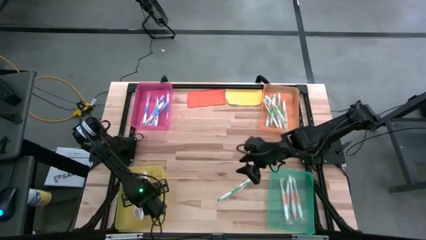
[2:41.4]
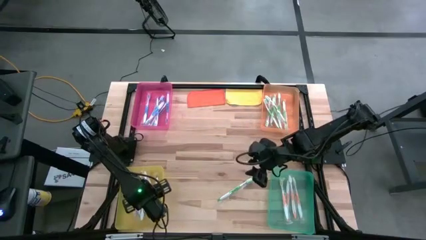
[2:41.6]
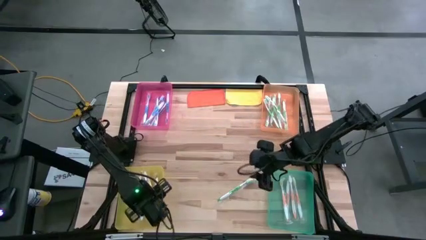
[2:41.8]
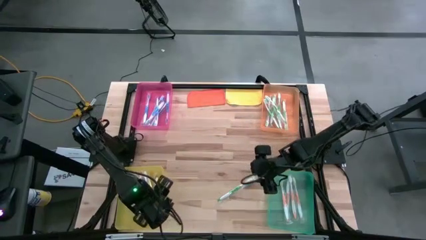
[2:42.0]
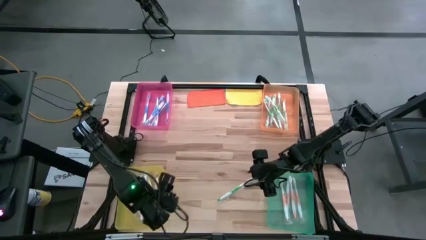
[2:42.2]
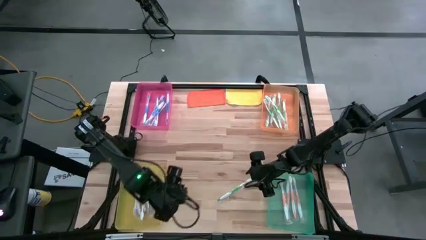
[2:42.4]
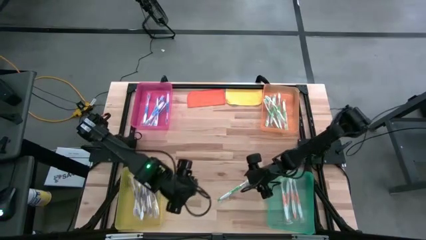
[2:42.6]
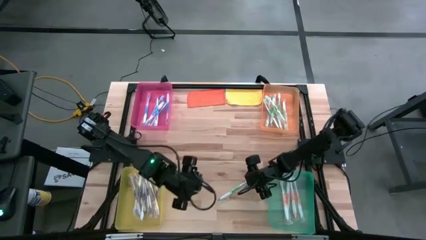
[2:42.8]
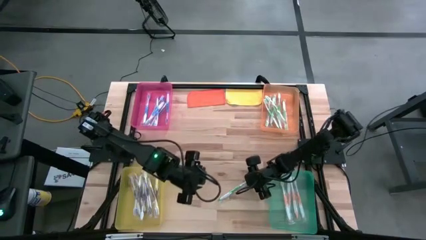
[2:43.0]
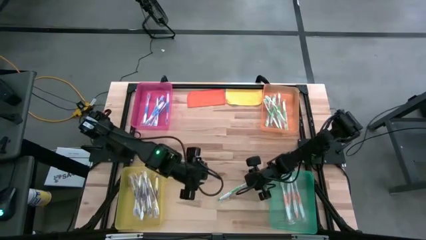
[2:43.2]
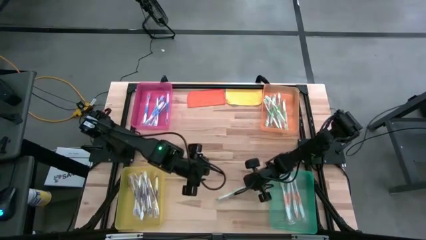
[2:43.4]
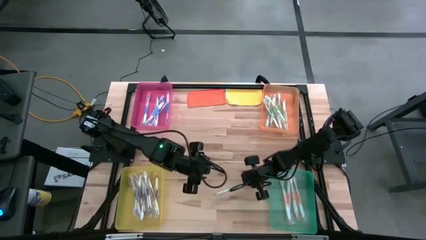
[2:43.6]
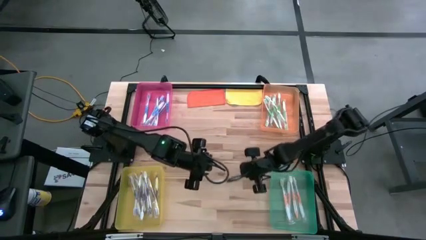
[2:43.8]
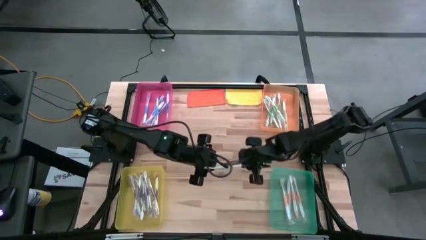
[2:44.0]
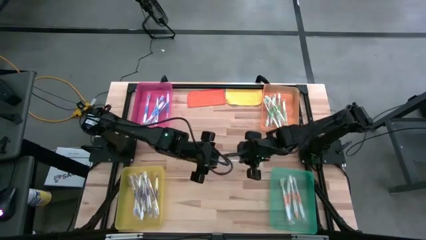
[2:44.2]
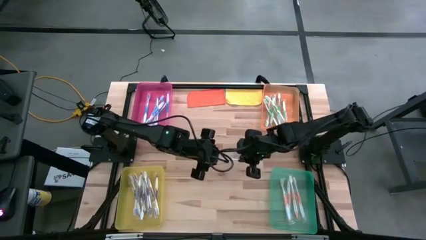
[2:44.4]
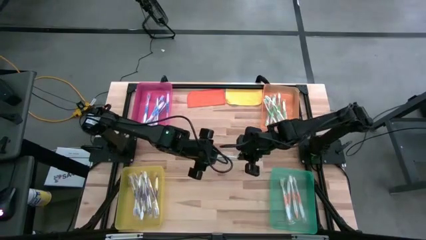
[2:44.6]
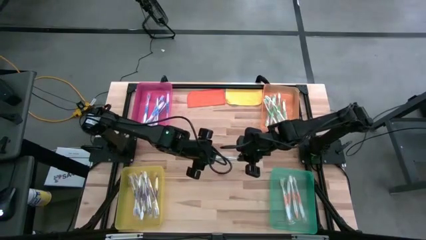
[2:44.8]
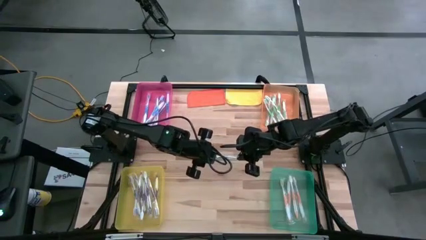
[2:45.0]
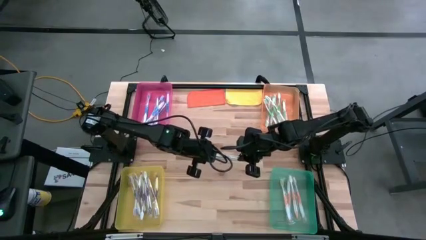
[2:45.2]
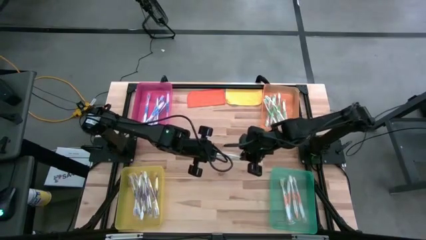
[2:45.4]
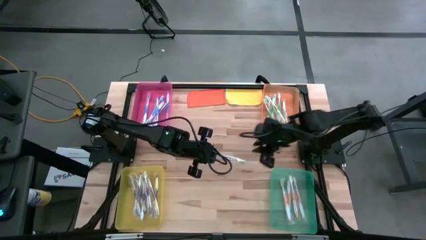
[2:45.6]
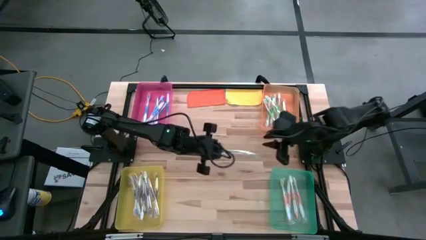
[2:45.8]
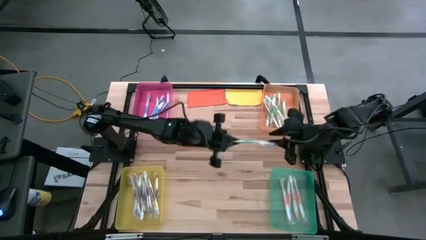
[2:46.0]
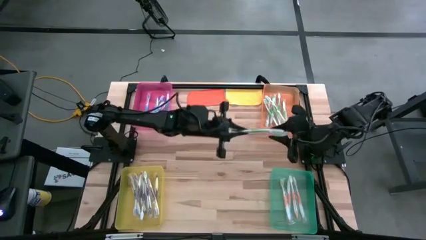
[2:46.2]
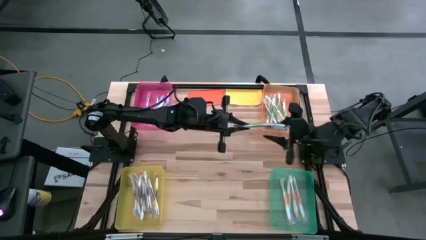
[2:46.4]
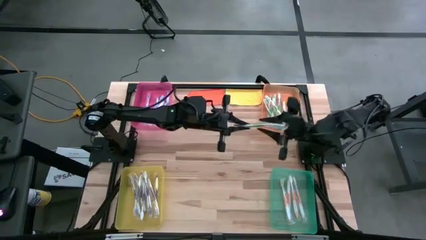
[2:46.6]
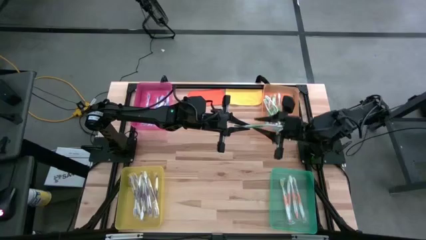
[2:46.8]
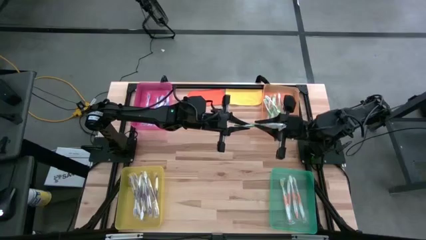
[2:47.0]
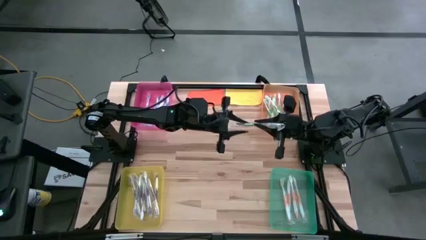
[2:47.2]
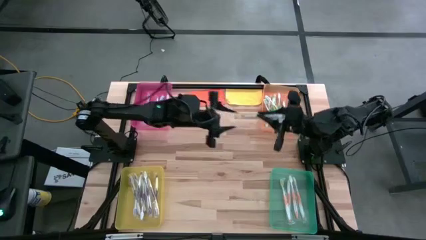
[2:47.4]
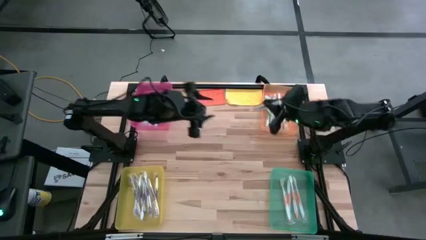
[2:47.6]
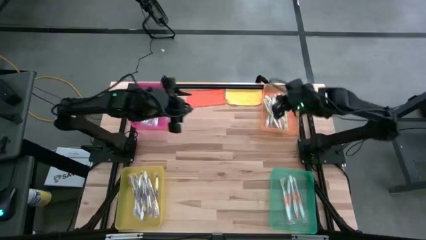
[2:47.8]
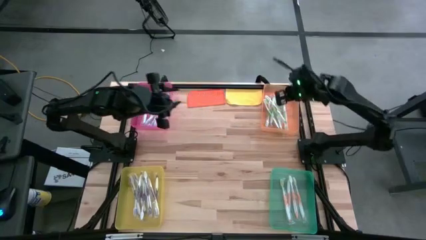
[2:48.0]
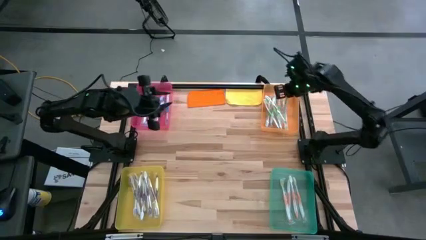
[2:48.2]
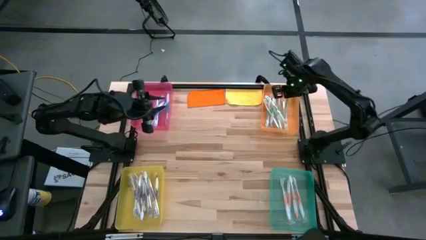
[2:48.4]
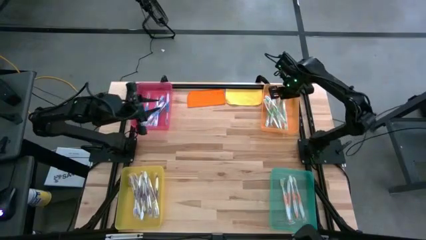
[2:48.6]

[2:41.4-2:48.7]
Task: Pick & Place Toothbrushes
Put the green toothbrush into the orange bin

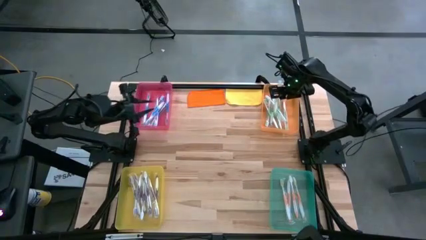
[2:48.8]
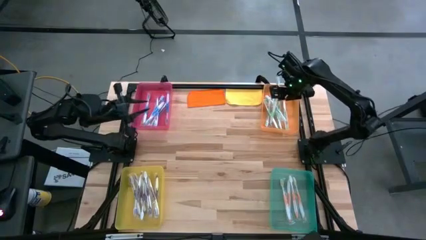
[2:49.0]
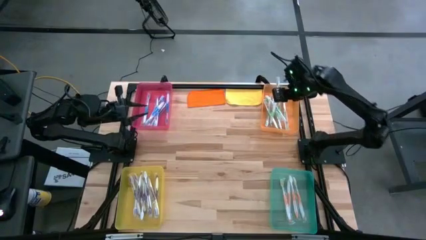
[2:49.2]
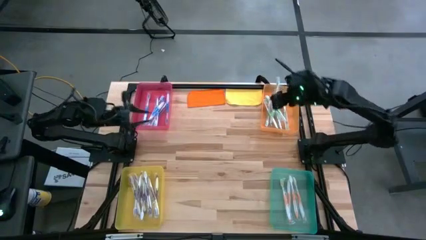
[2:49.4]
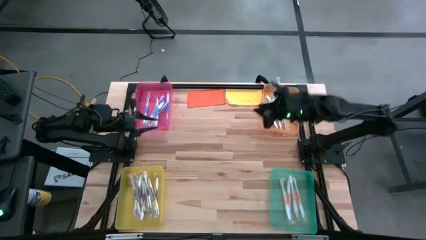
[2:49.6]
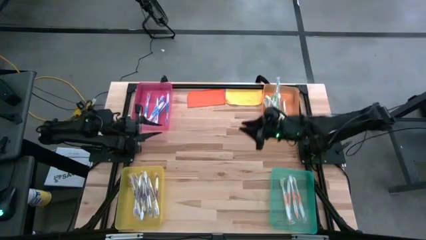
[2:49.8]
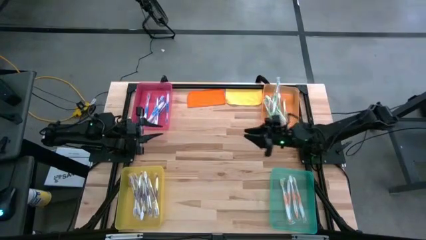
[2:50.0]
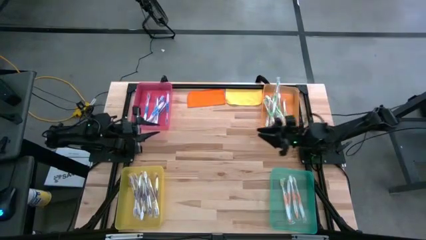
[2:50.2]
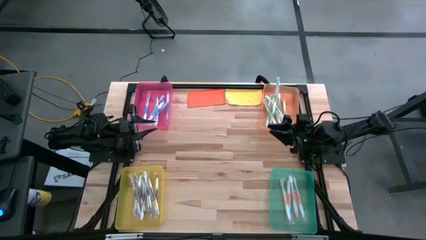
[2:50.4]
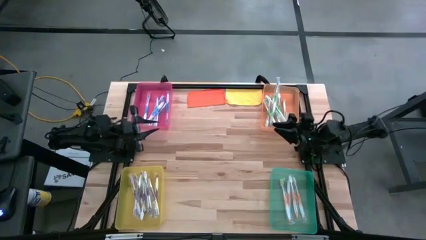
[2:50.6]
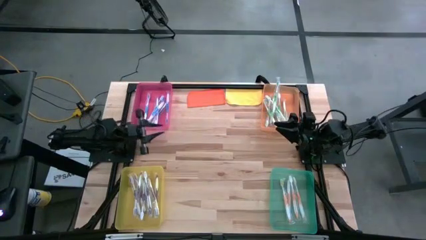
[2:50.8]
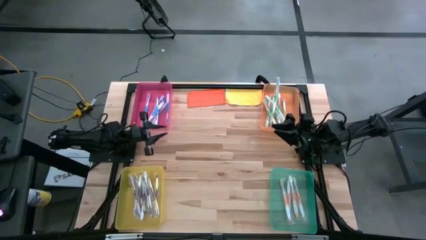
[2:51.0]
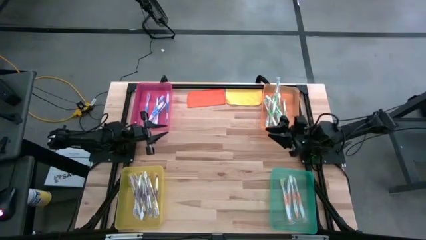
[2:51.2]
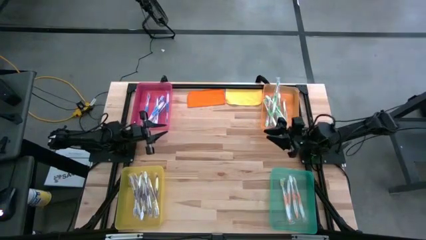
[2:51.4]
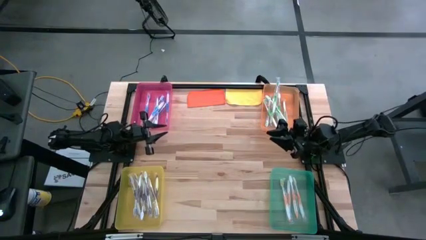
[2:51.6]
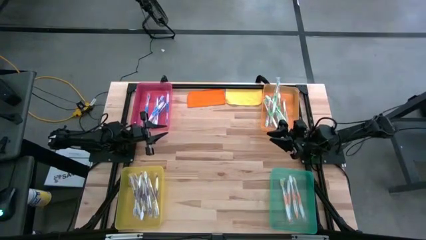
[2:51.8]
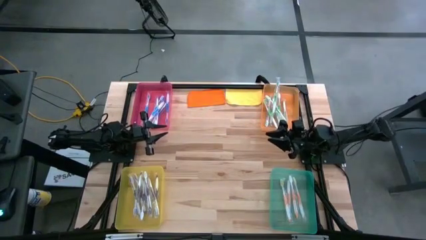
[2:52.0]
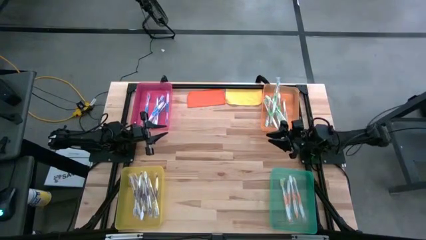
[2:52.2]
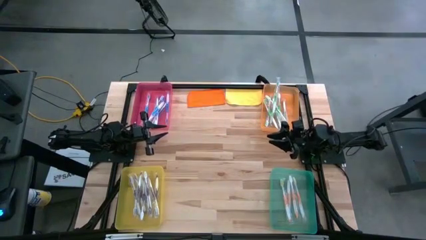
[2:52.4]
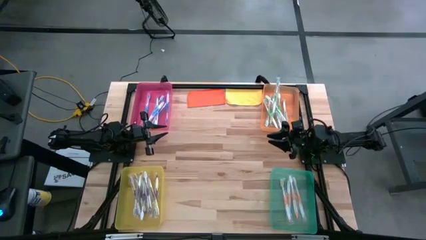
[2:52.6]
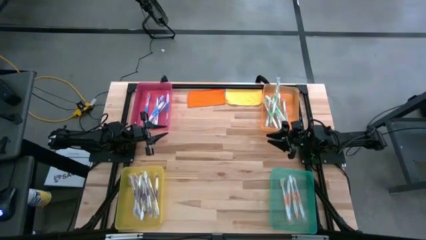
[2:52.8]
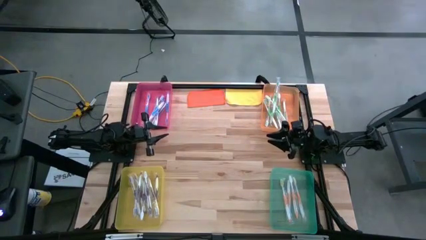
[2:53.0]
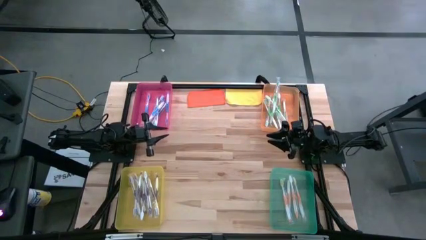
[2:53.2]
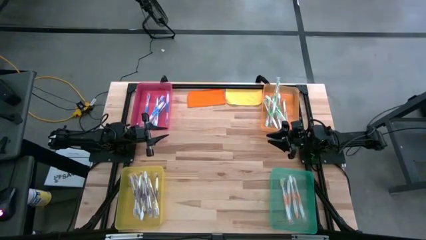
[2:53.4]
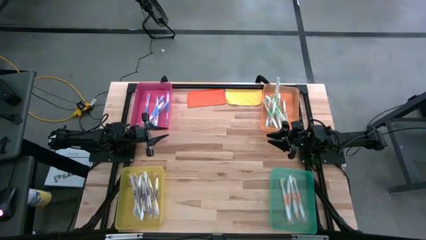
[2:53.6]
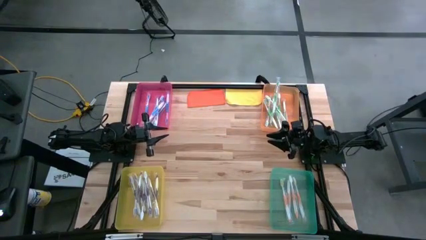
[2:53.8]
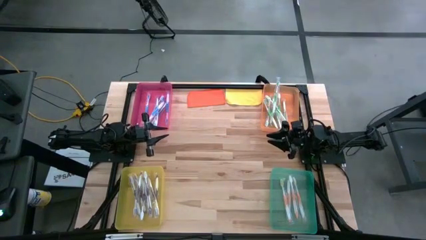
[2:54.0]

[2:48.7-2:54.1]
Return to Home Position

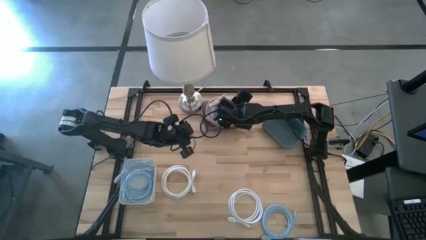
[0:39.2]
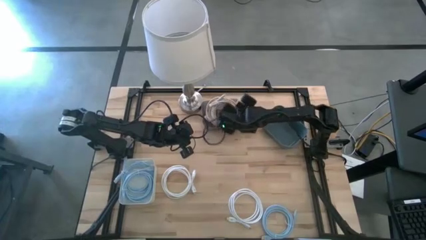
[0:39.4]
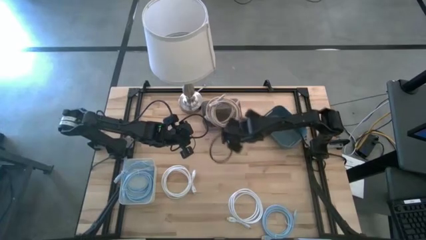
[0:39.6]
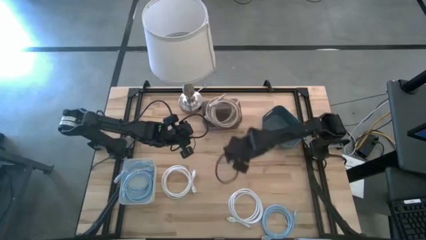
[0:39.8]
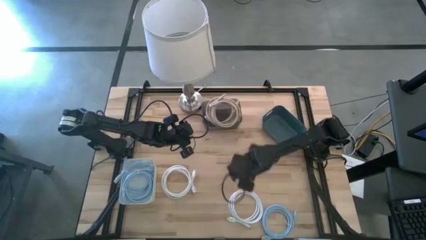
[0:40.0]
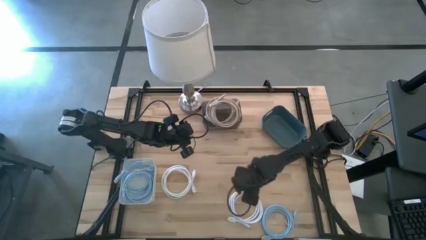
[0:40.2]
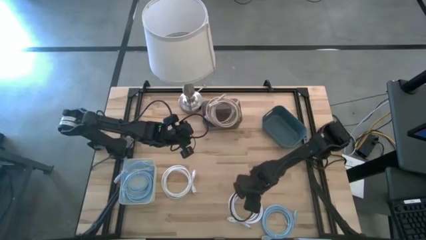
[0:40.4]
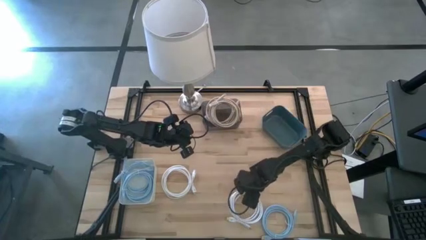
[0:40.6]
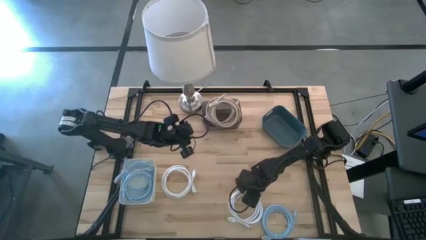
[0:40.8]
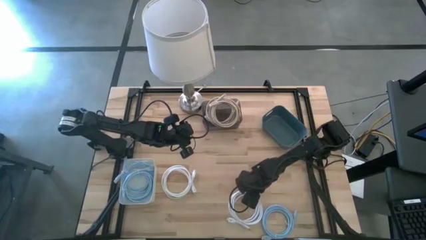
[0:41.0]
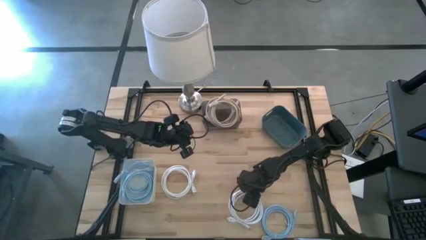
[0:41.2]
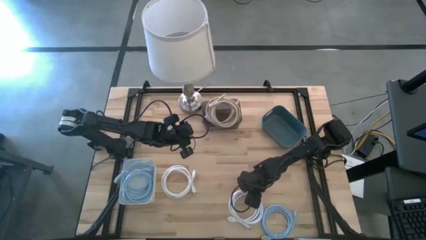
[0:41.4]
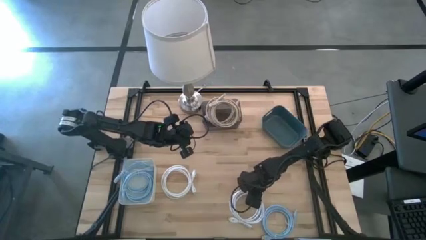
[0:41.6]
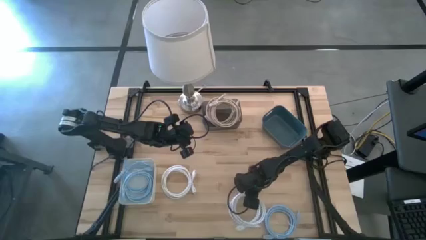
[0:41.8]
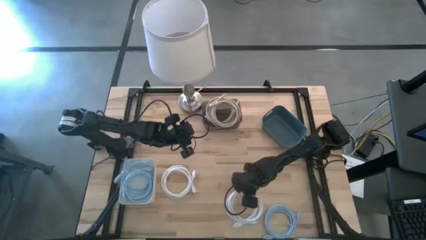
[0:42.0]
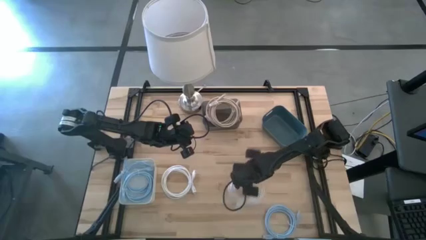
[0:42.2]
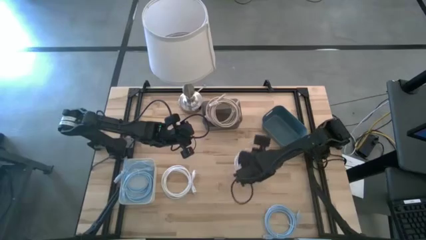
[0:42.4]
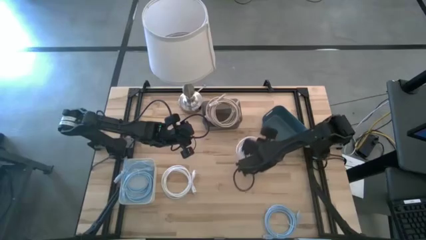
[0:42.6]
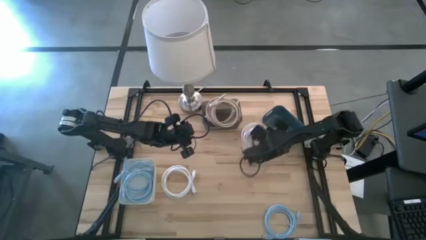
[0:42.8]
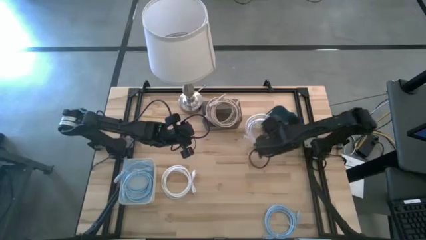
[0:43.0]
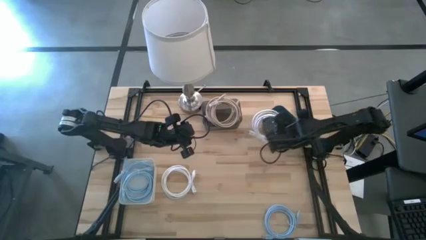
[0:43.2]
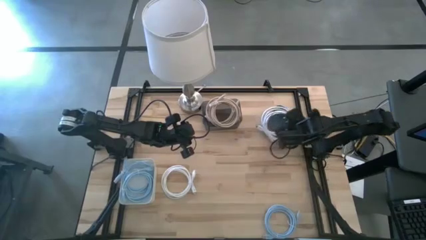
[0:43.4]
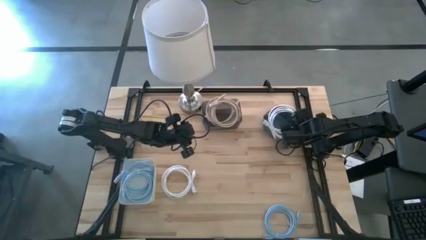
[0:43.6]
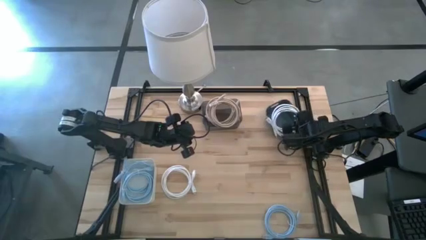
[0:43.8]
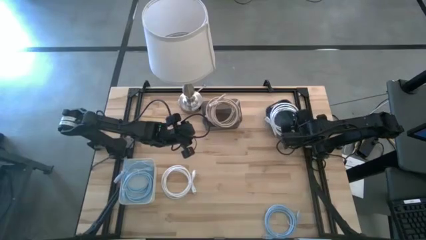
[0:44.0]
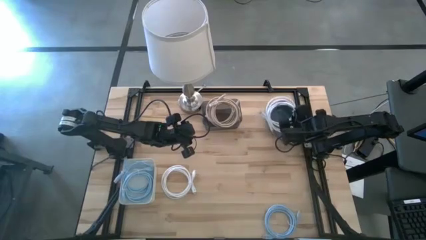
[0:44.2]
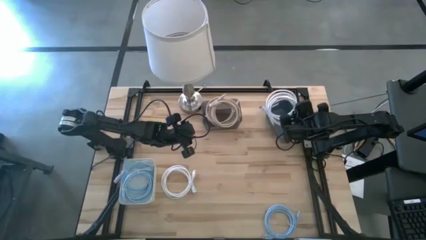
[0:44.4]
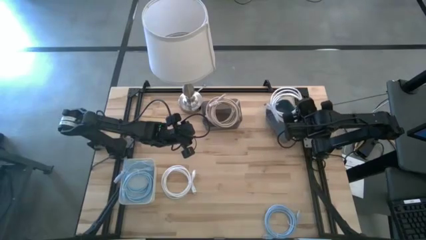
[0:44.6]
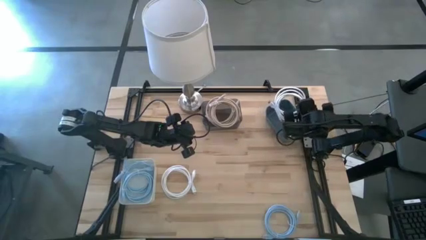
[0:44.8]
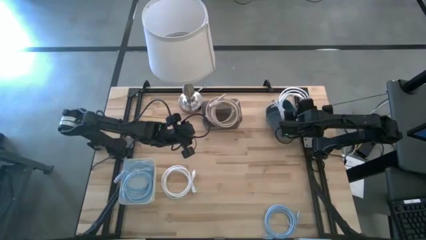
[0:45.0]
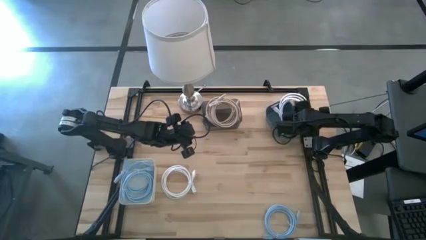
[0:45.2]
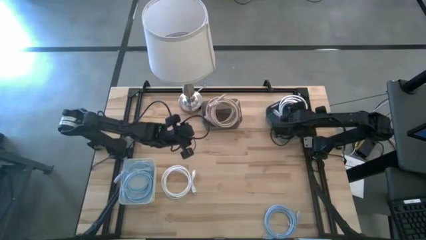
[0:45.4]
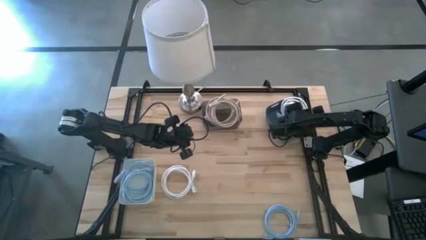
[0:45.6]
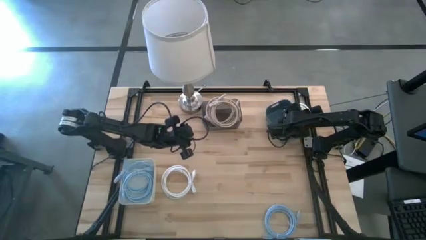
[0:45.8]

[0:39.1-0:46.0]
Task: Sort HDMI cables
Put the bottom white HDMI cable into the blue bin
